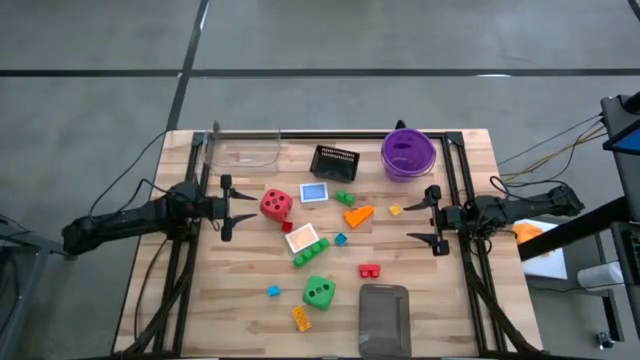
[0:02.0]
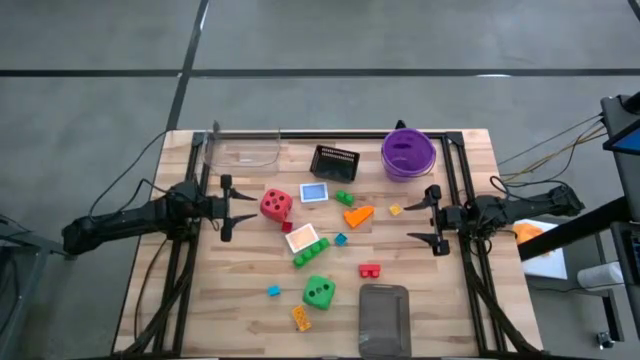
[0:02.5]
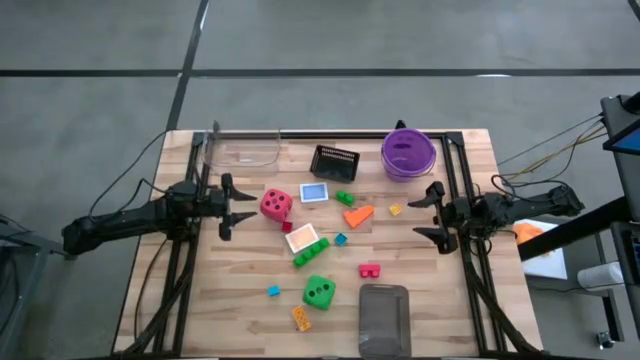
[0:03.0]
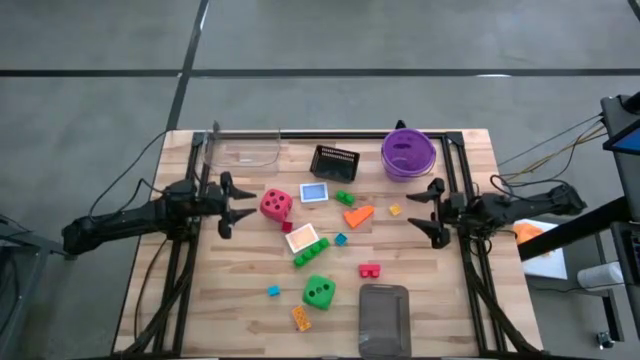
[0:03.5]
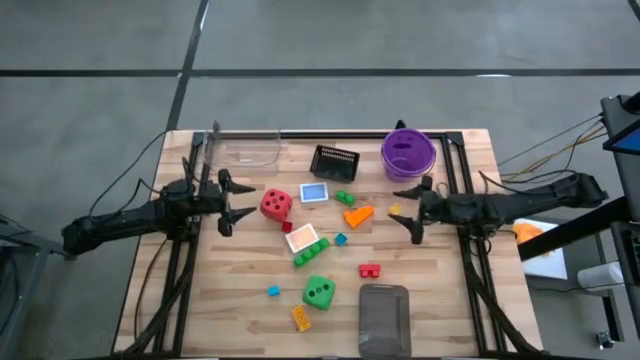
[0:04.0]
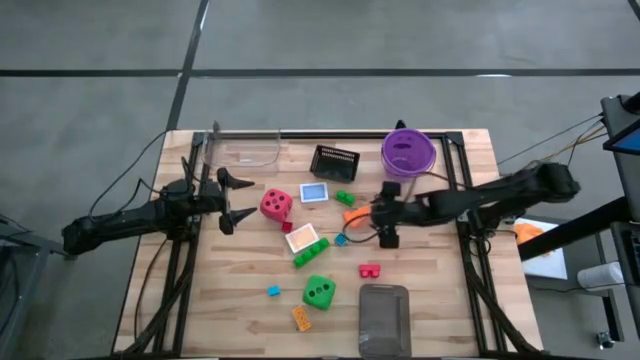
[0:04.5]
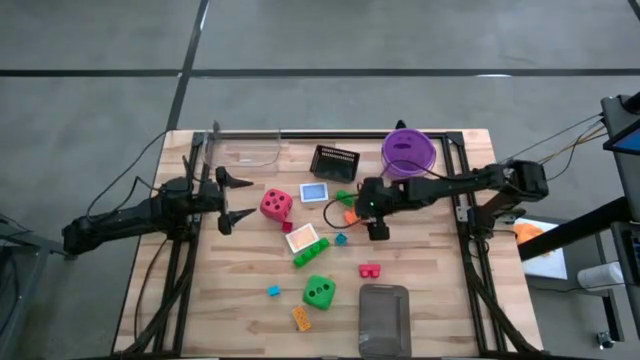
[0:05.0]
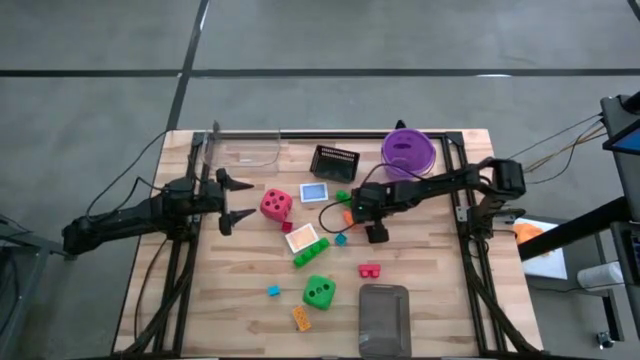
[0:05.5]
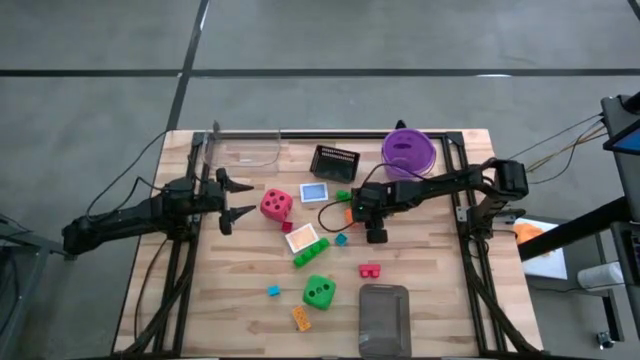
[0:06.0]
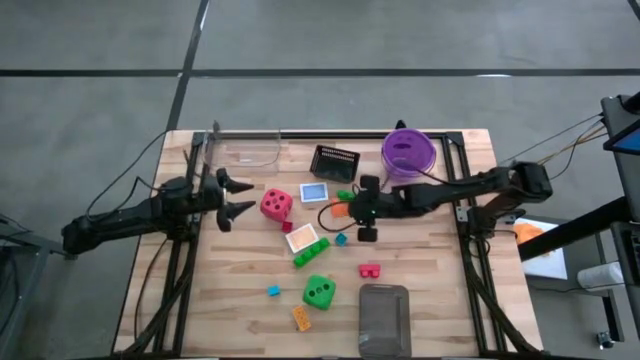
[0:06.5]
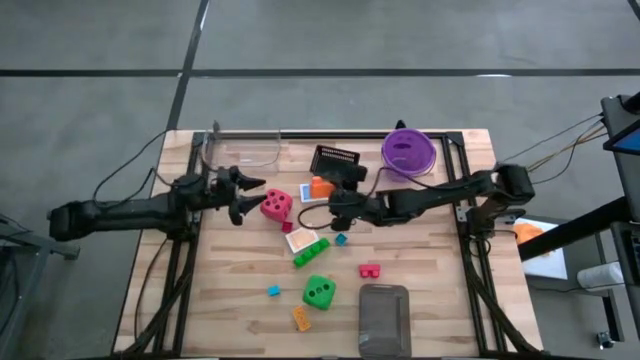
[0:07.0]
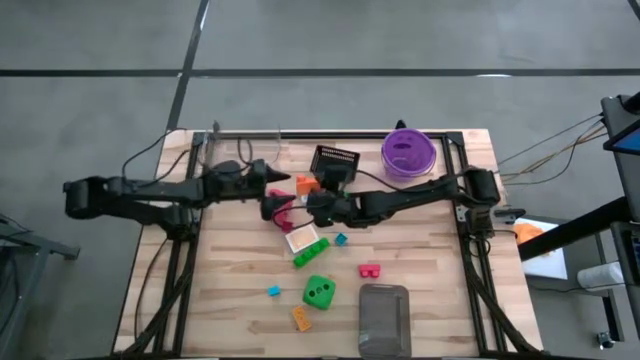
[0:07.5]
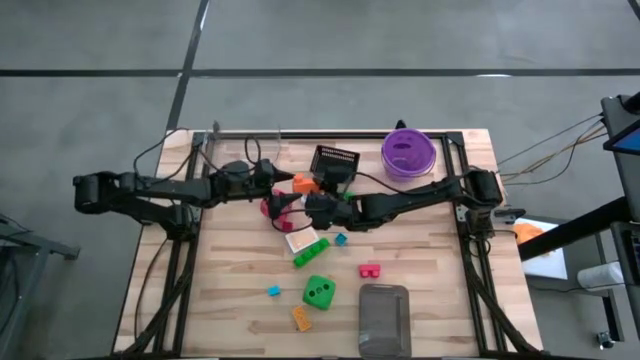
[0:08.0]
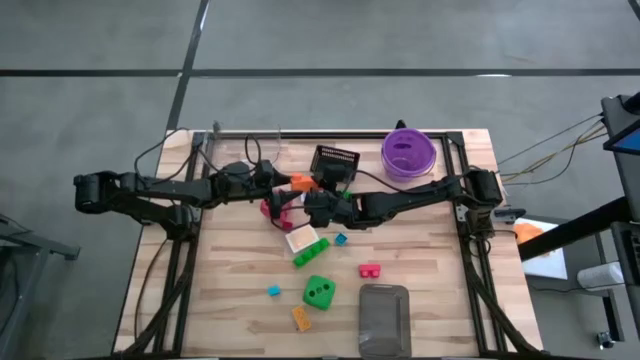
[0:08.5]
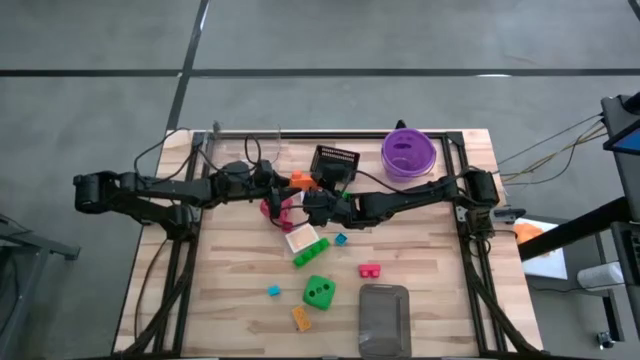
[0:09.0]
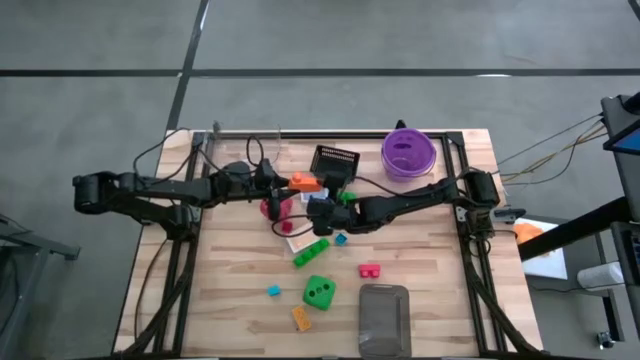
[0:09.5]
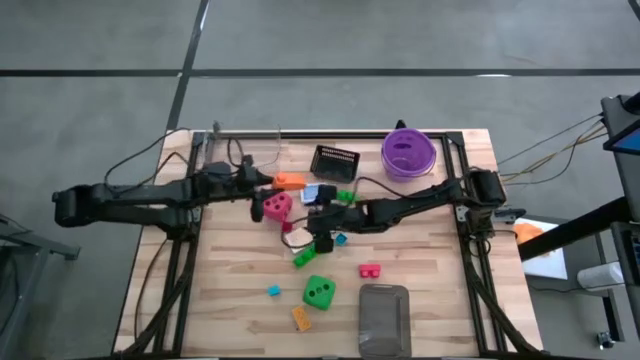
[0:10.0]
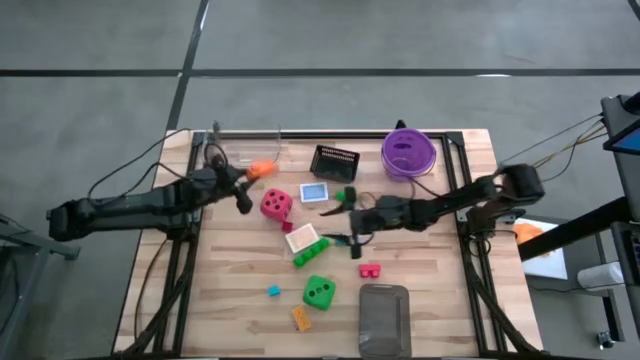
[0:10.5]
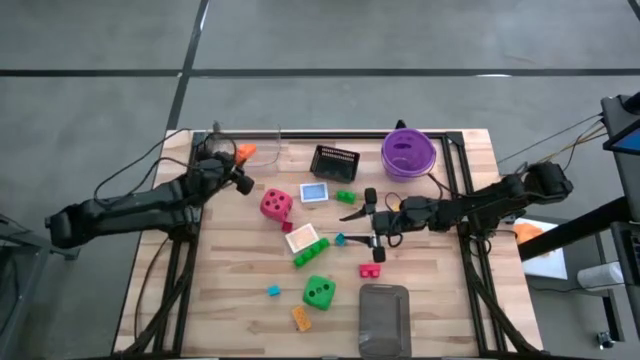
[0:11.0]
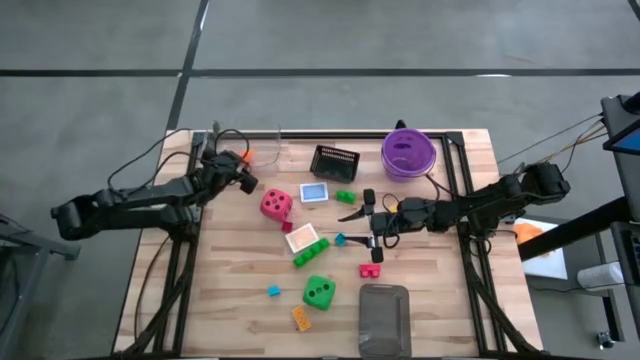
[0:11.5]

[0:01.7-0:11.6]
Task: Pick & Place Toys
Put the orange game piece into the transparent bin

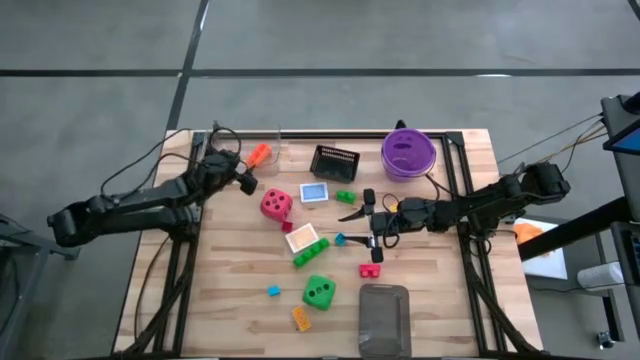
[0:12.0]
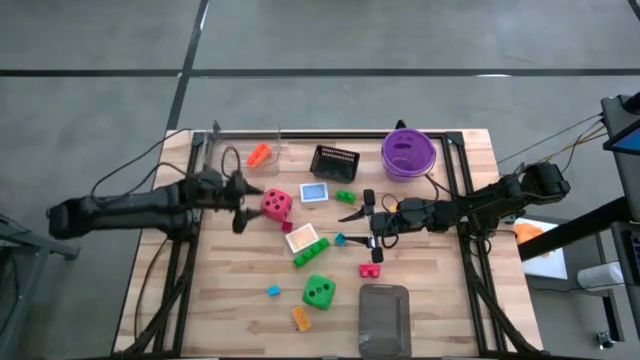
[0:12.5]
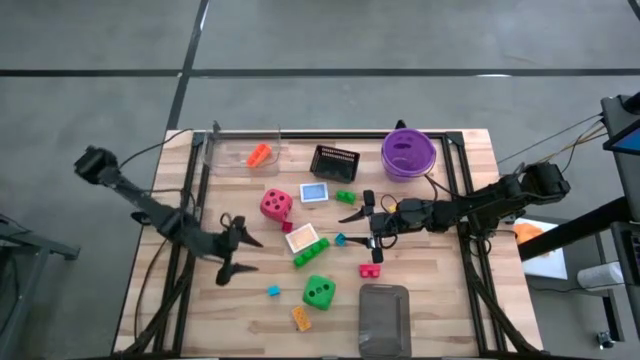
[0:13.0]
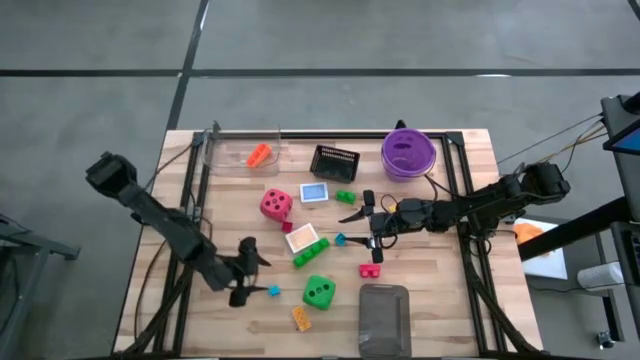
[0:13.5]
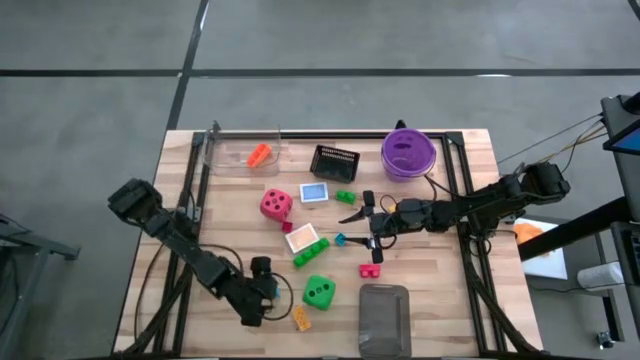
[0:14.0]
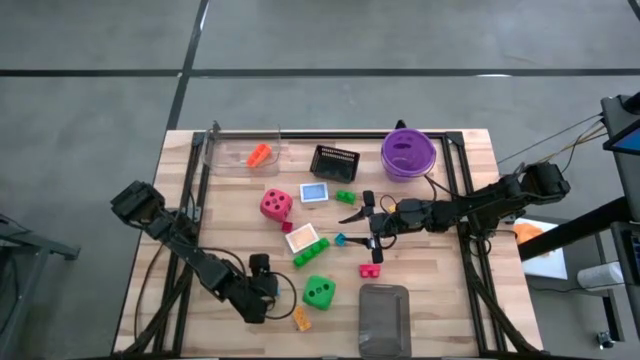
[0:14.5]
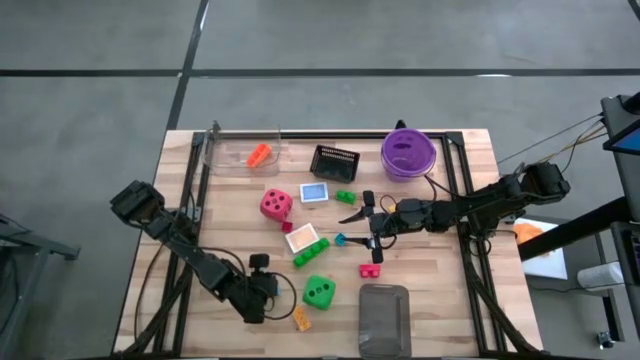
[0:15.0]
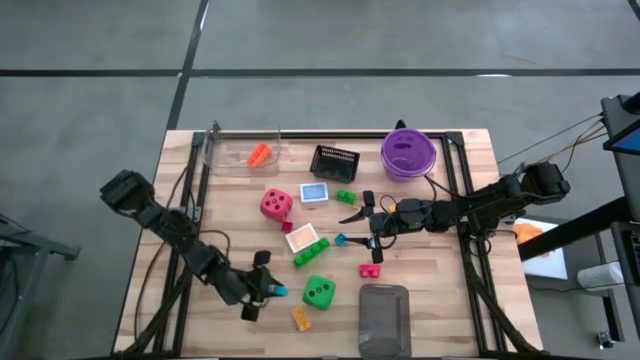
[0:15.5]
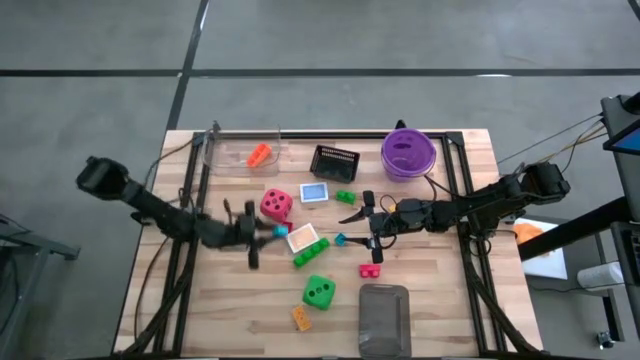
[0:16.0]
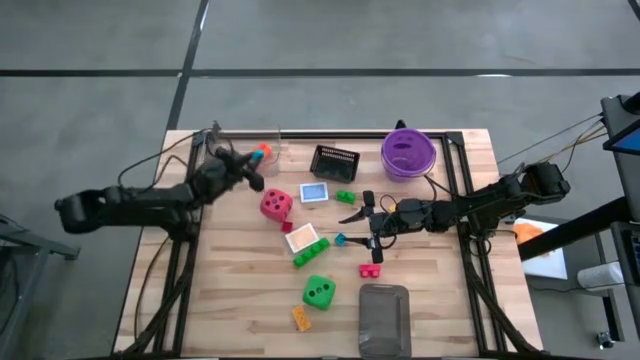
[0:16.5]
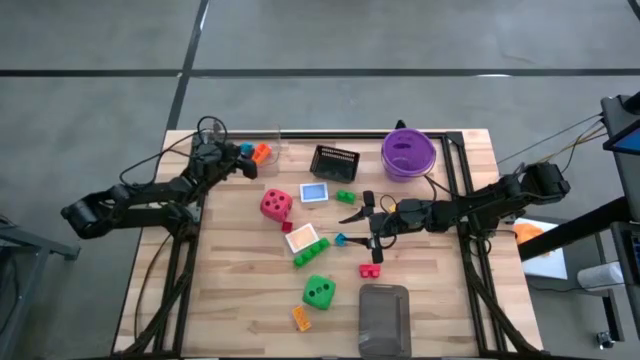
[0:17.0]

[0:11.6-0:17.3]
Put the bottom blue game piece into the transparent bin

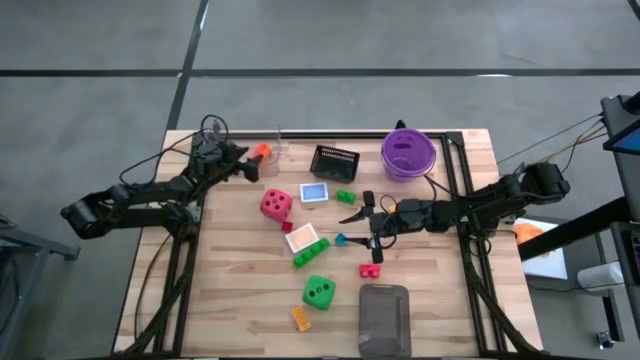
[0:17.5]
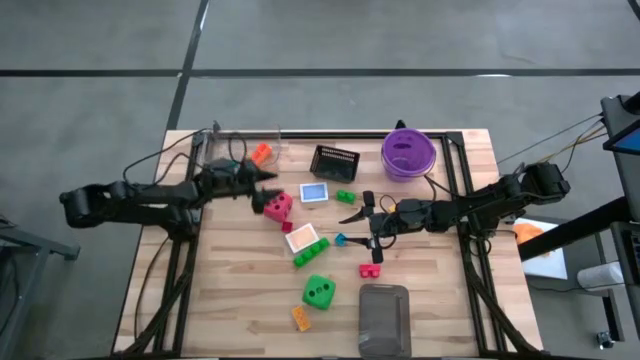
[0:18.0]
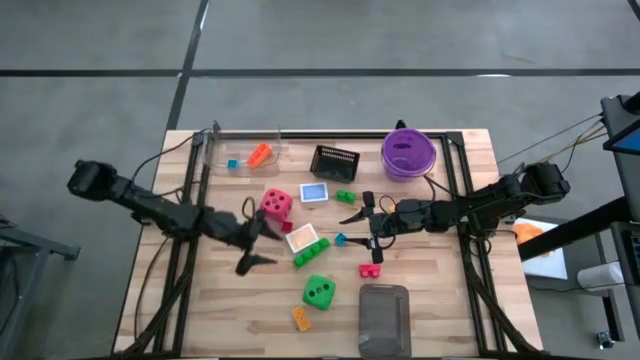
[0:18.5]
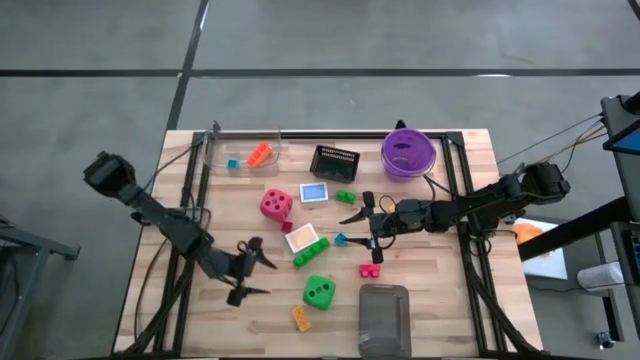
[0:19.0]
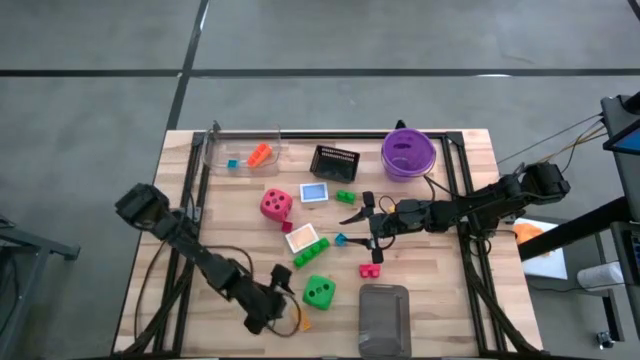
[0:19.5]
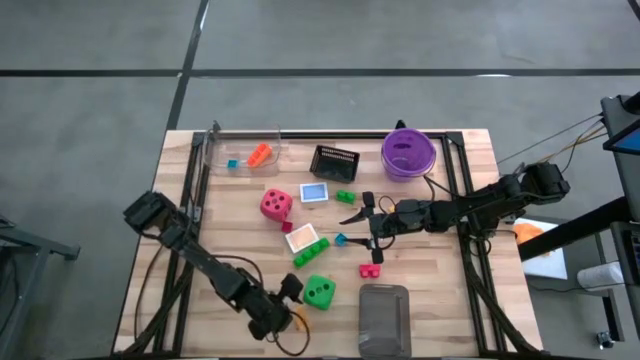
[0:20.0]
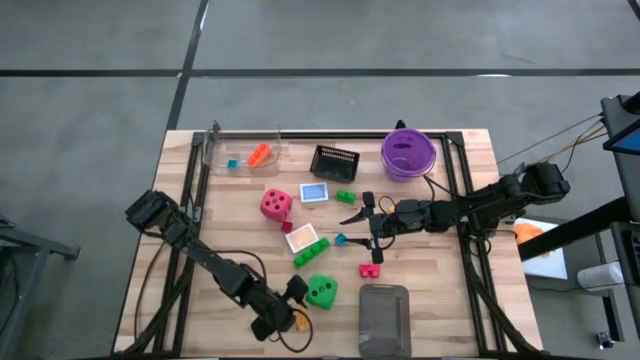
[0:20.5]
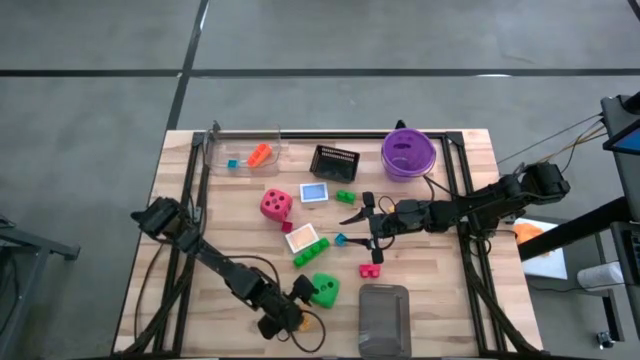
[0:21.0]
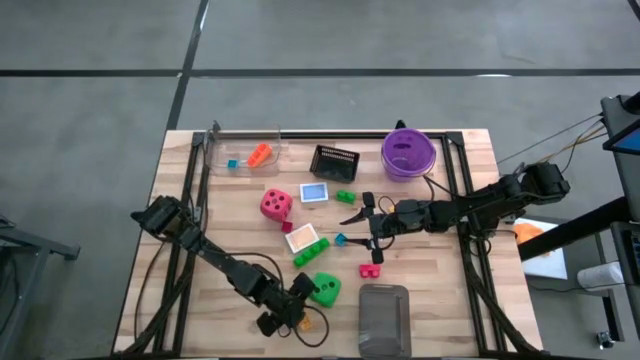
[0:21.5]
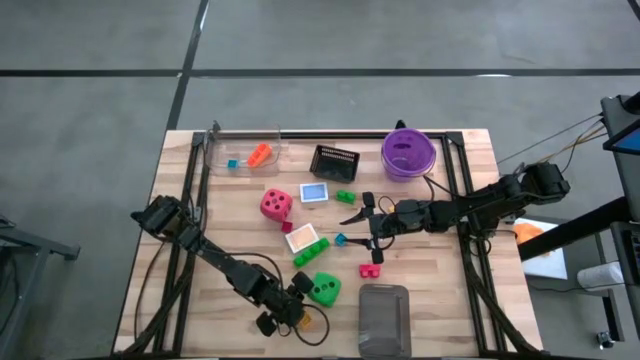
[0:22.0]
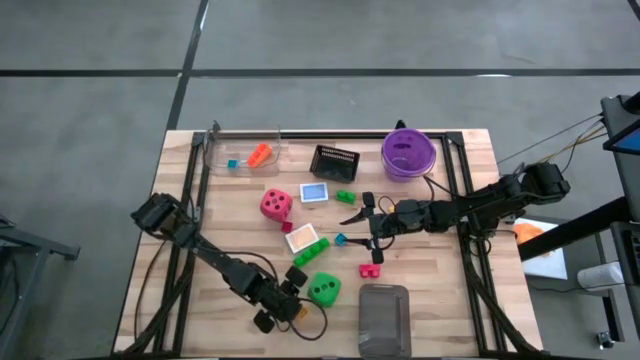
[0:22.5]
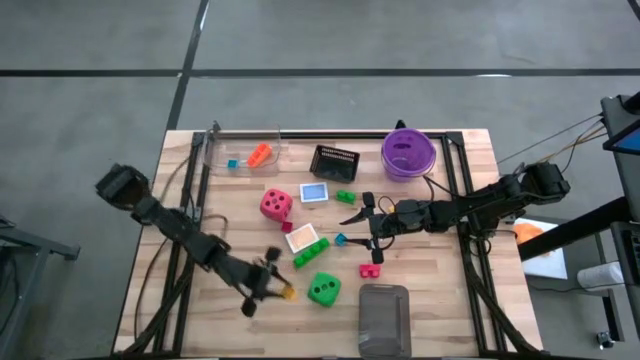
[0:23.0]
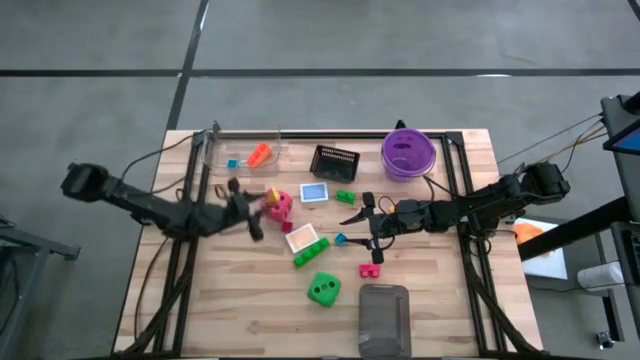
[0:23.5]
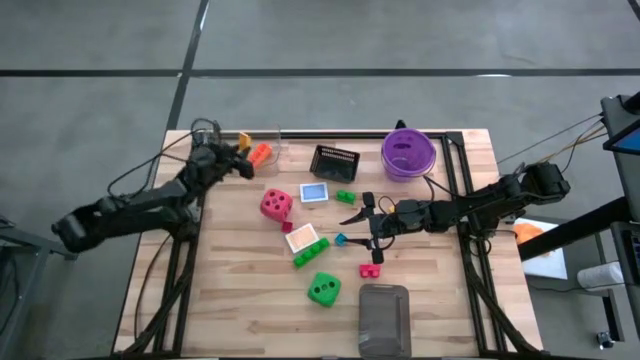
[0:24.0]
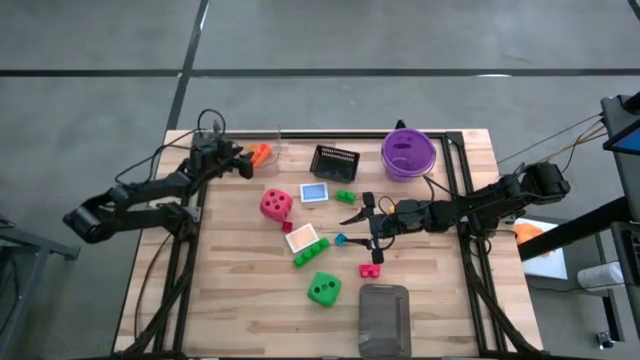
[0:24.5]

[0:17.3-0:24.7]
Put the yellow game piece into the transparent bin
